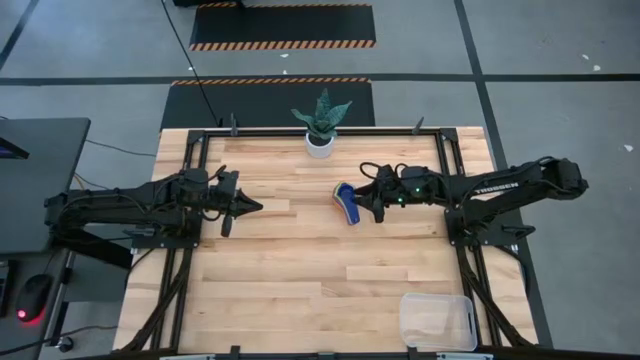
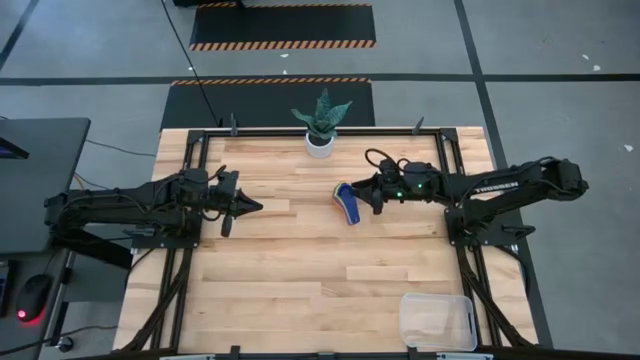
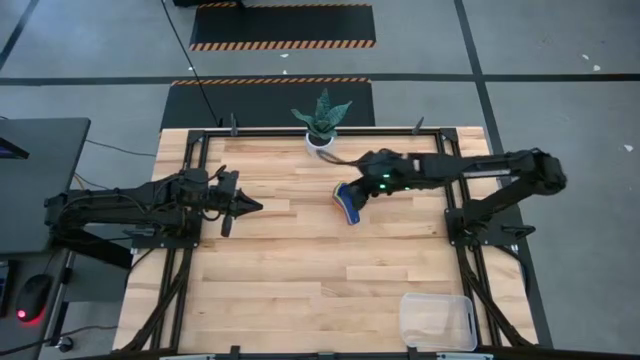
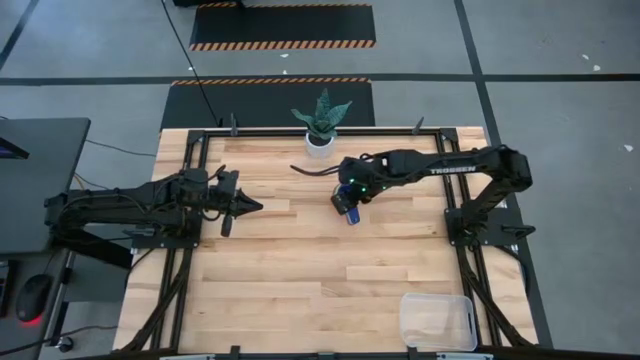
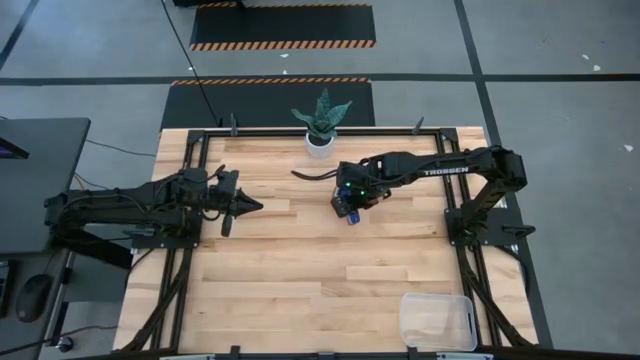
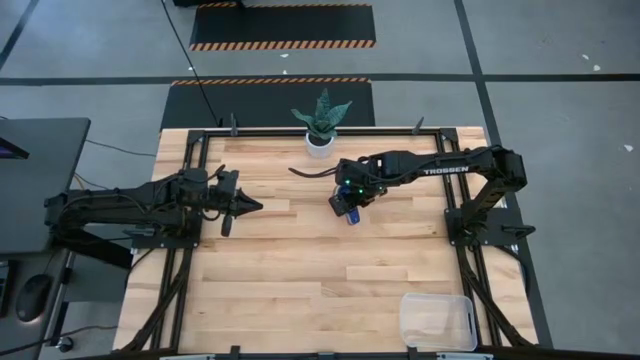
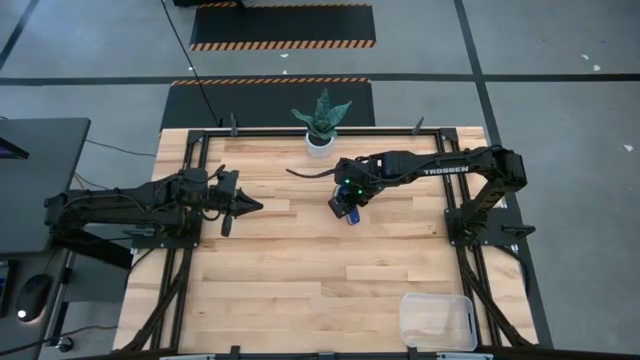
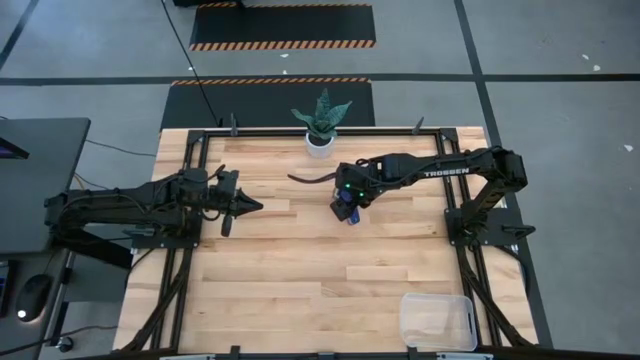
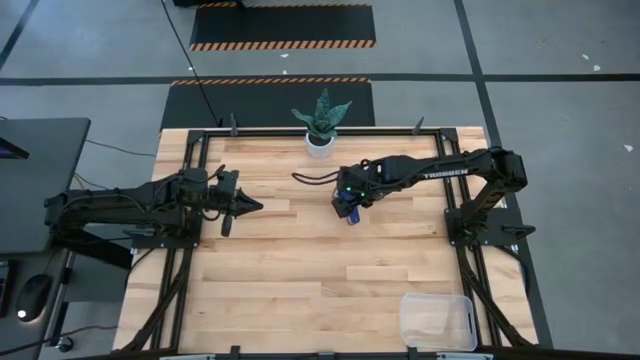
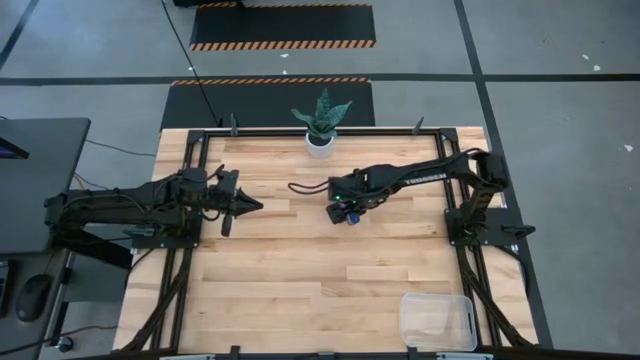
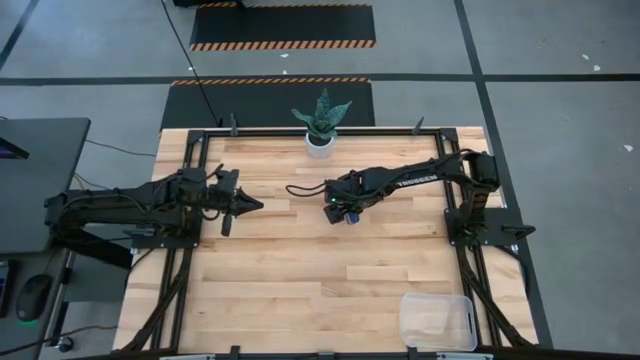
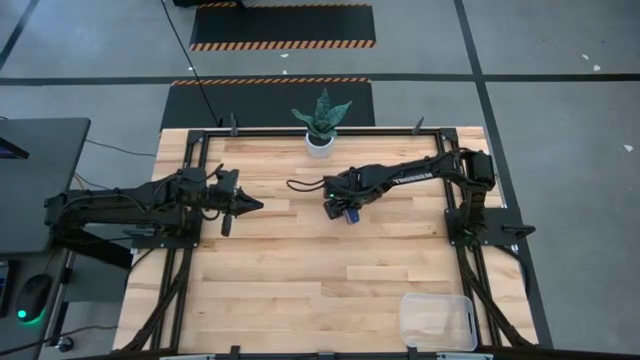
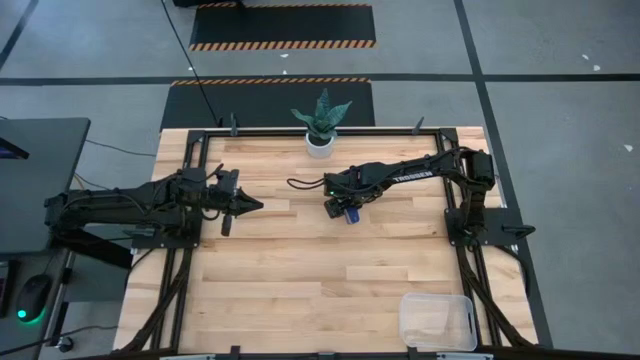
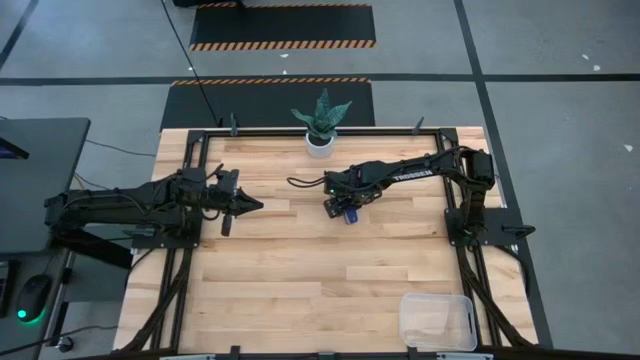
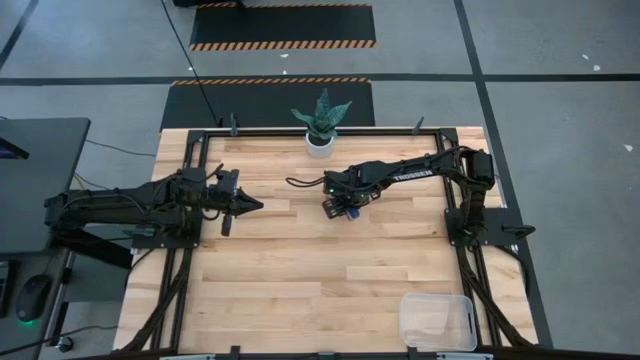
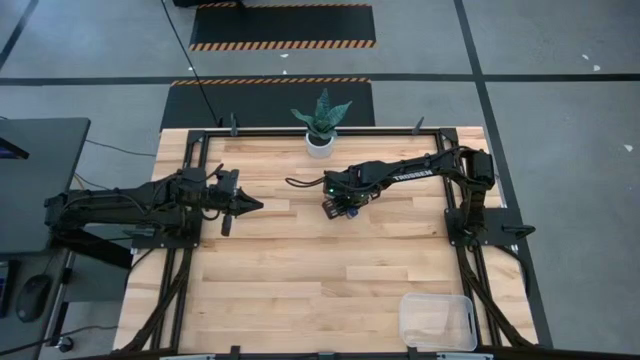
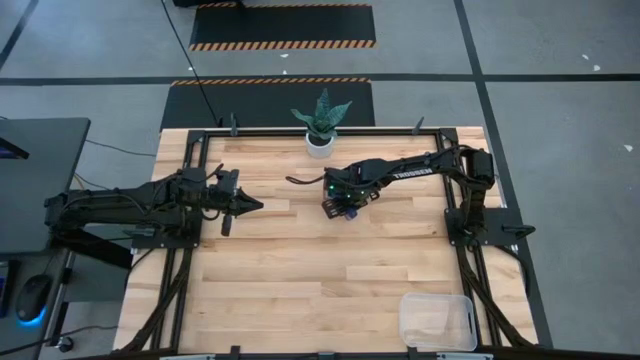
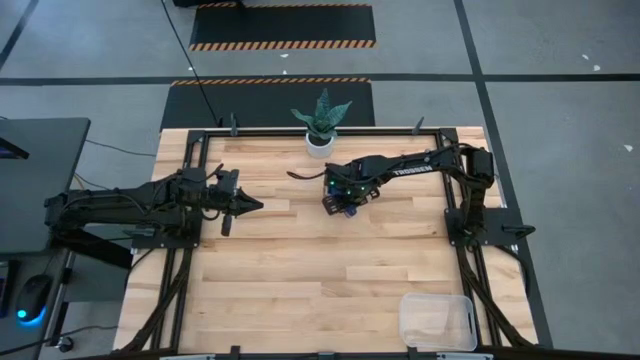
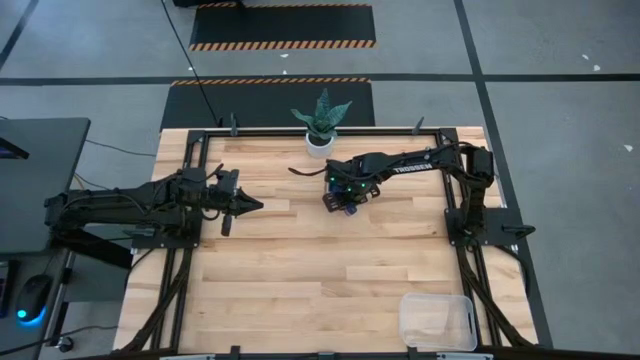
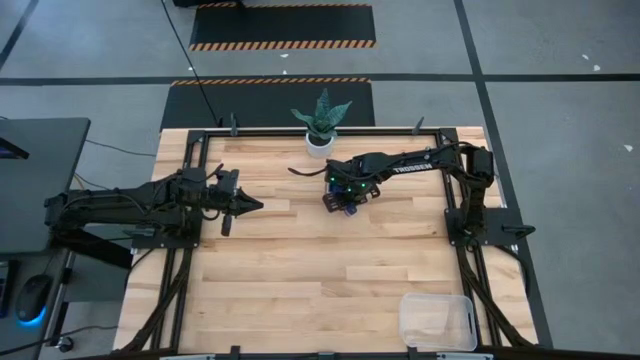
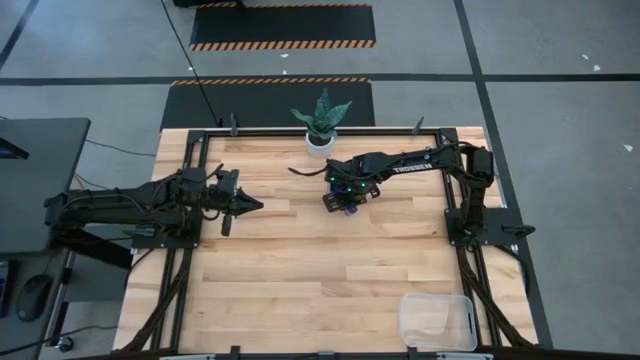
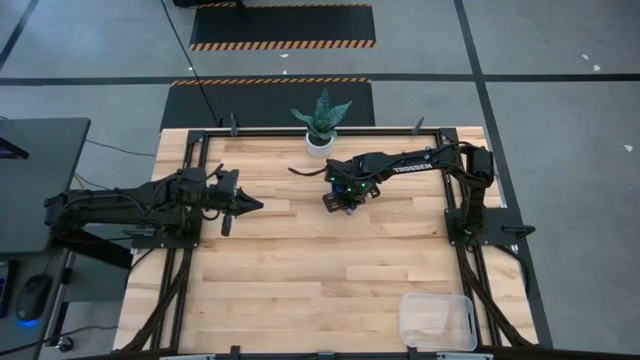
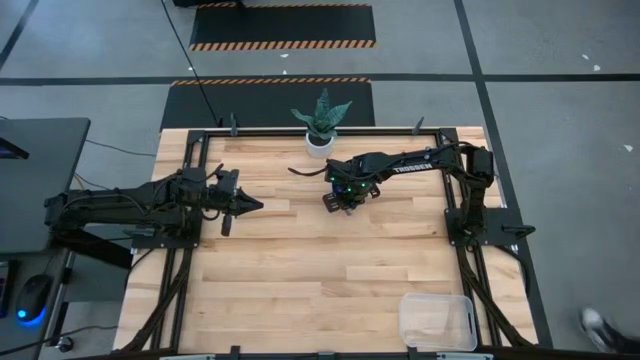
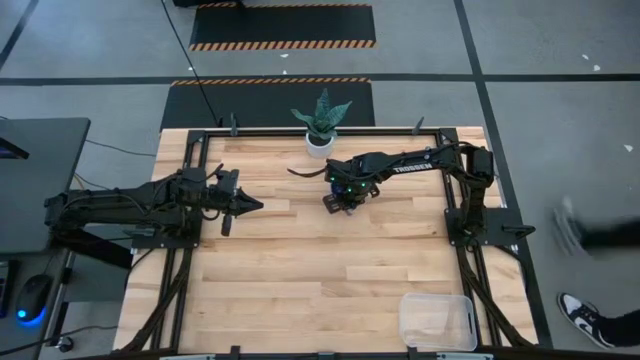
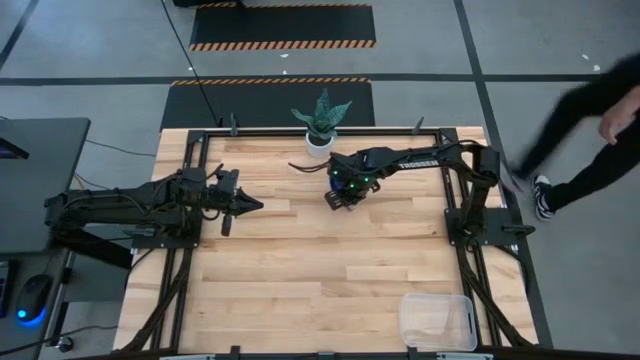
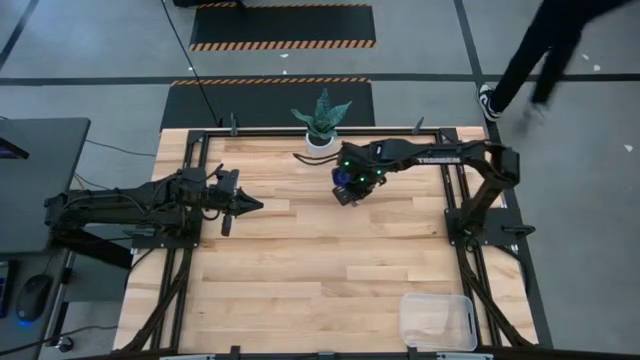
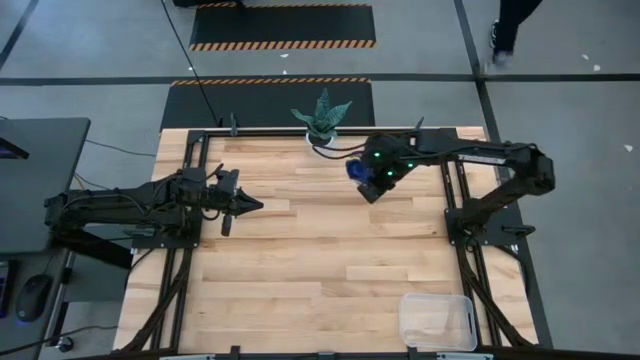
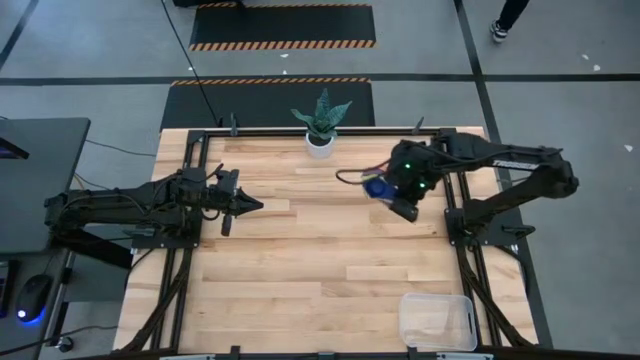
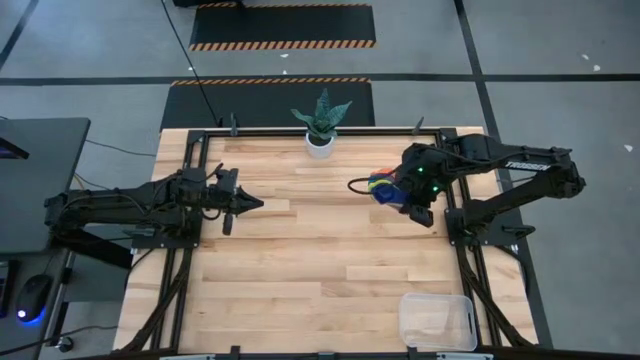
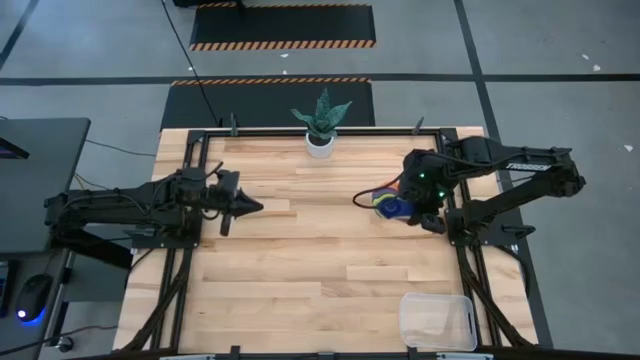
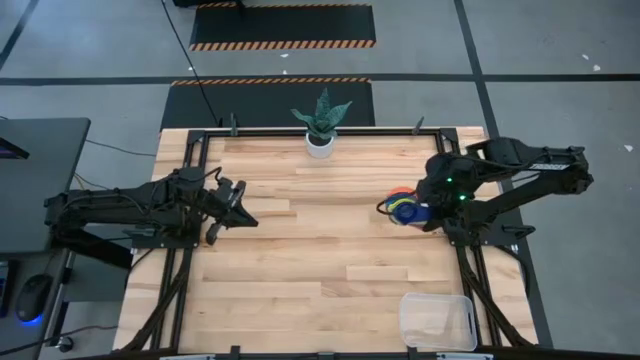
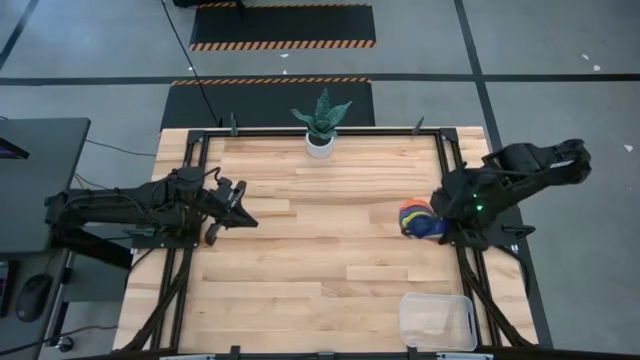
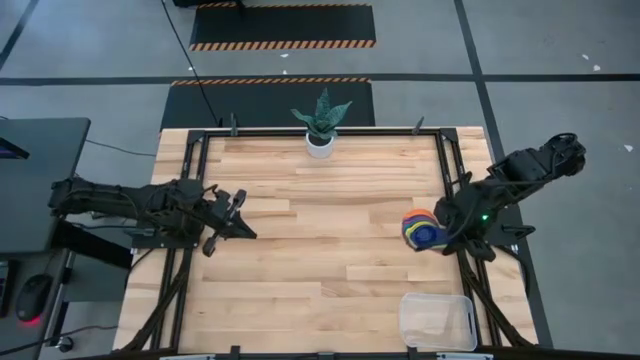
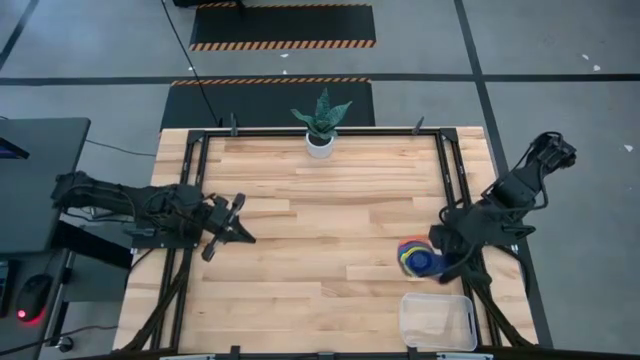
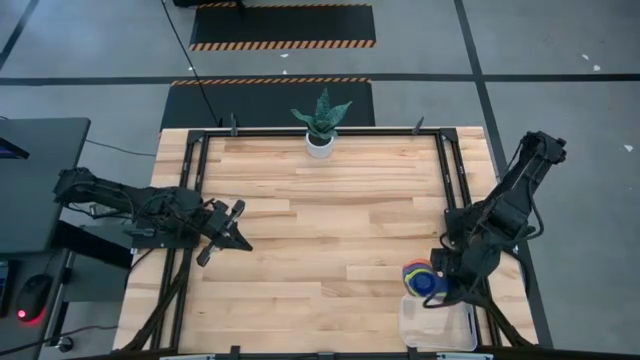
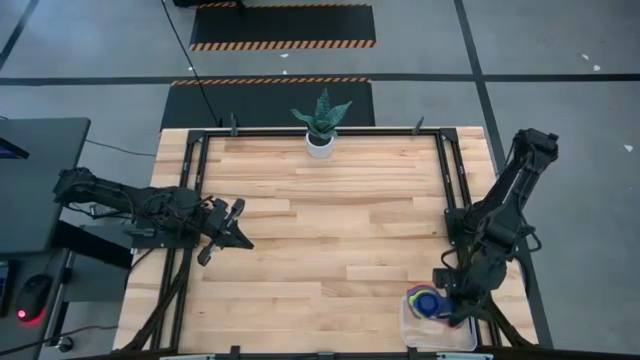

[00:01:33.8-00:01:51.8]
Task: Nest measuring cups in basket
Put the nested measuring cups into the transparent bin
